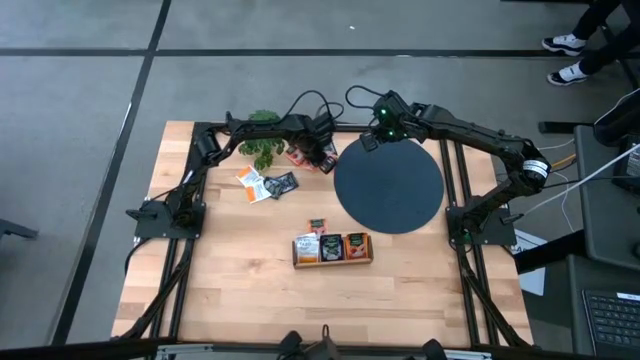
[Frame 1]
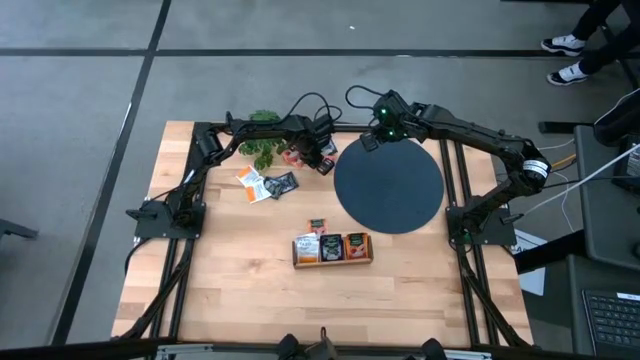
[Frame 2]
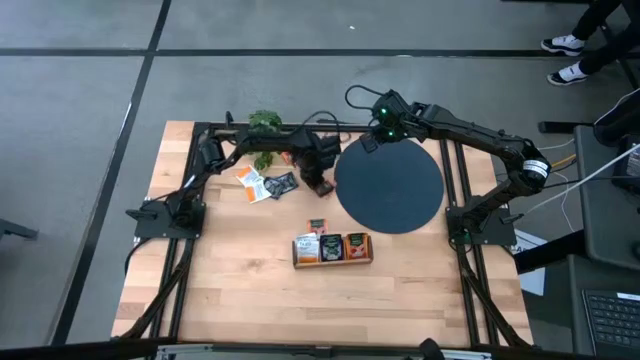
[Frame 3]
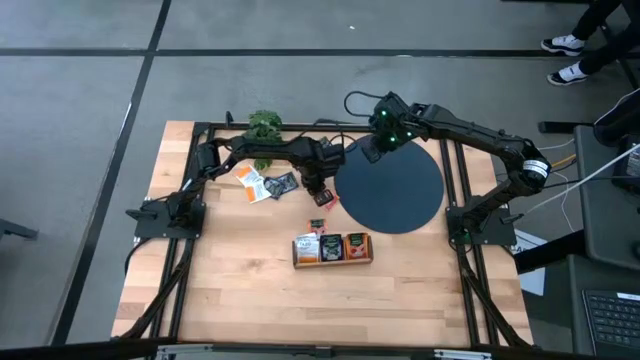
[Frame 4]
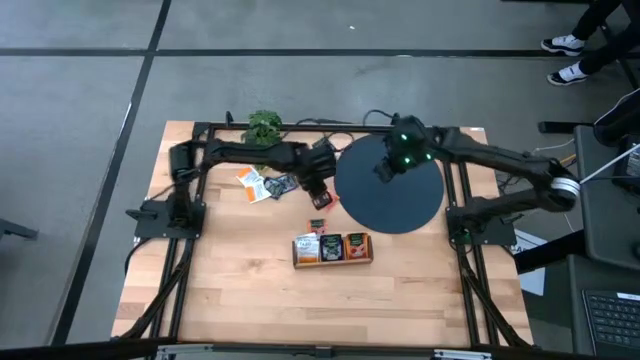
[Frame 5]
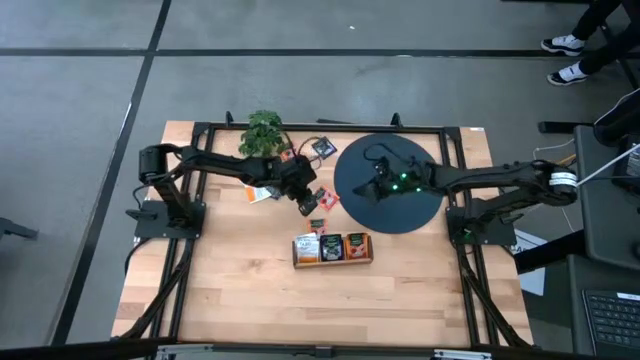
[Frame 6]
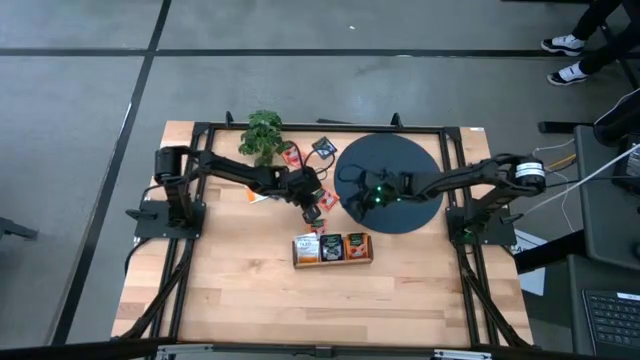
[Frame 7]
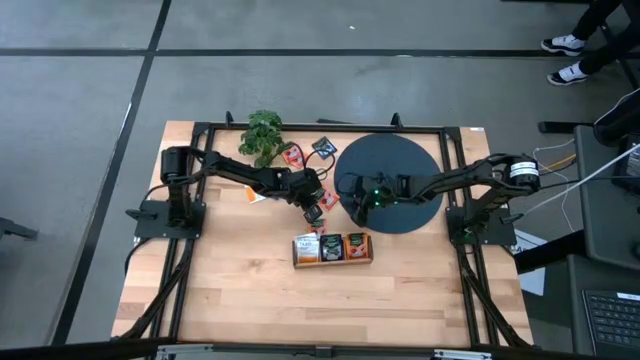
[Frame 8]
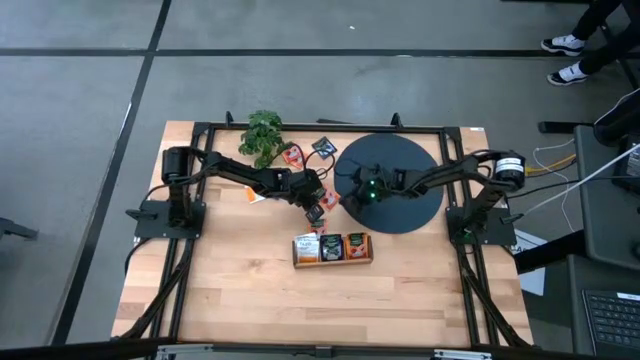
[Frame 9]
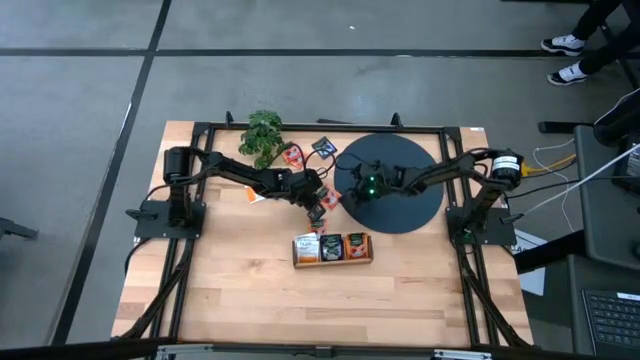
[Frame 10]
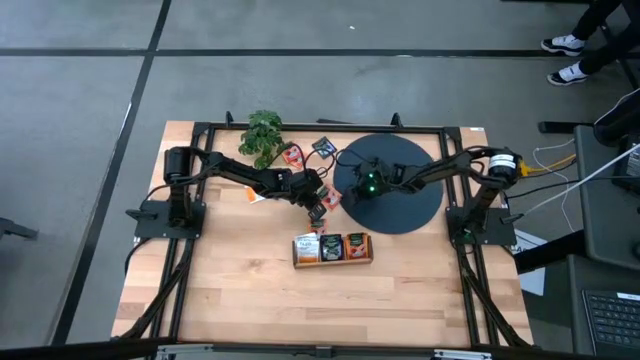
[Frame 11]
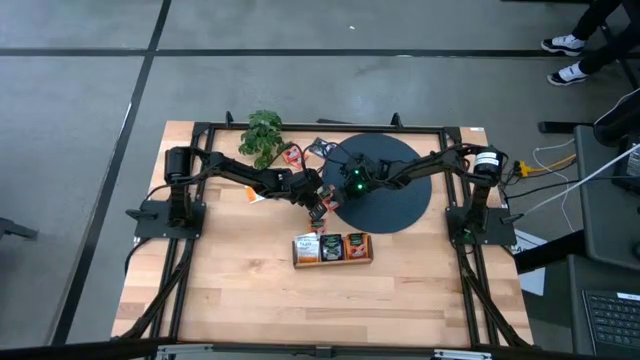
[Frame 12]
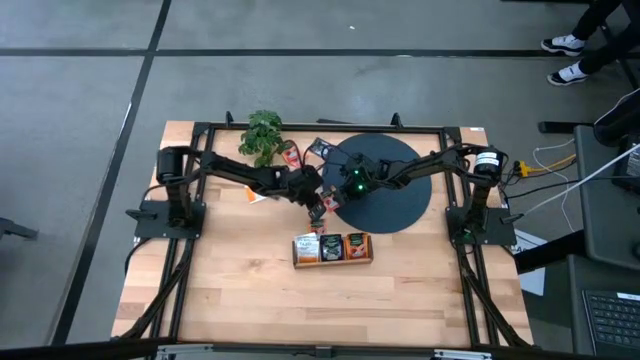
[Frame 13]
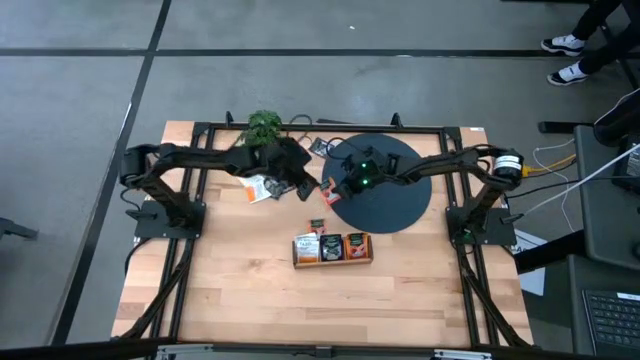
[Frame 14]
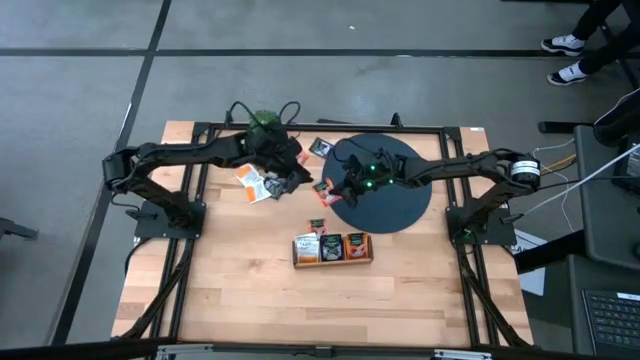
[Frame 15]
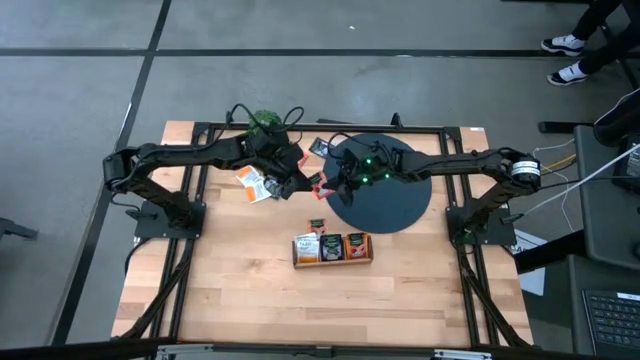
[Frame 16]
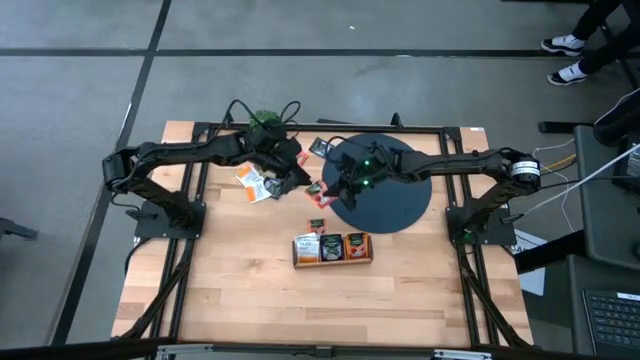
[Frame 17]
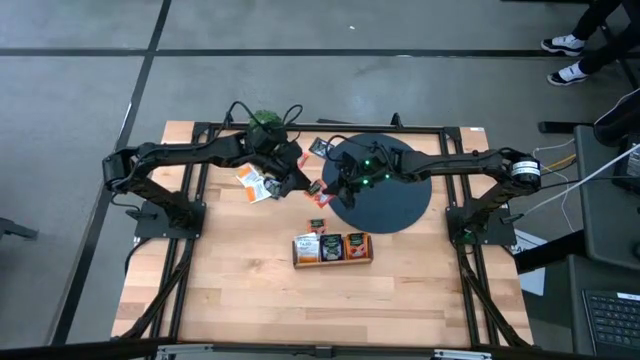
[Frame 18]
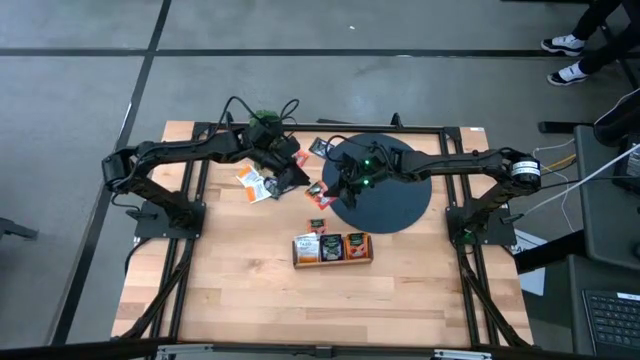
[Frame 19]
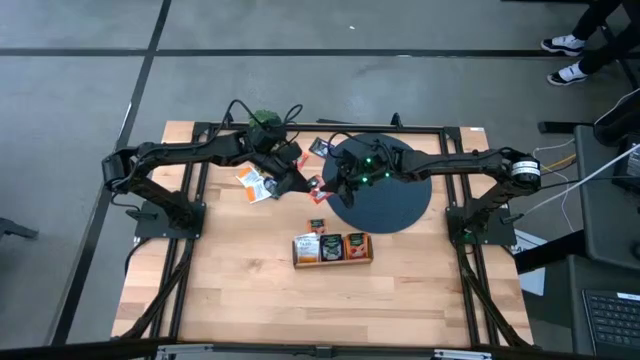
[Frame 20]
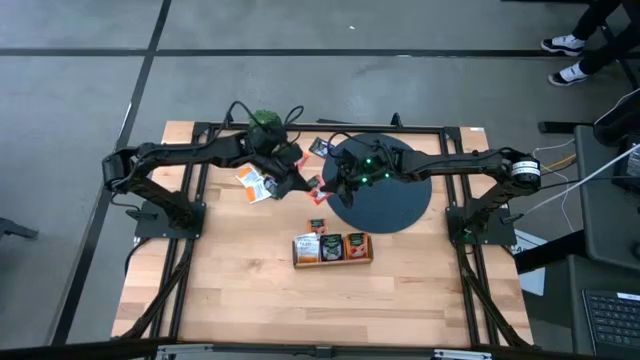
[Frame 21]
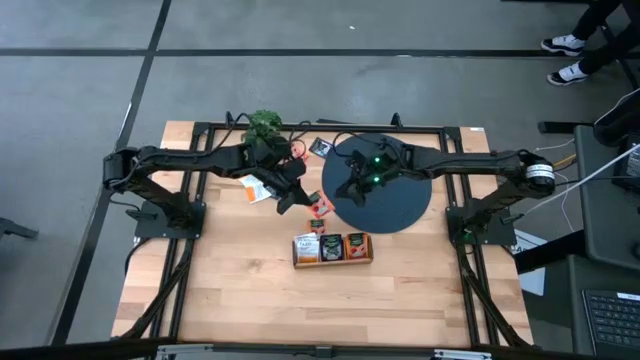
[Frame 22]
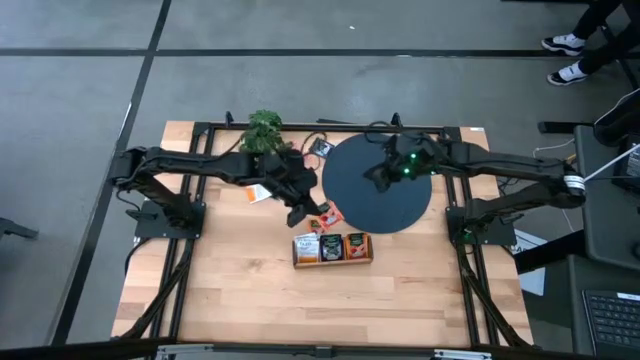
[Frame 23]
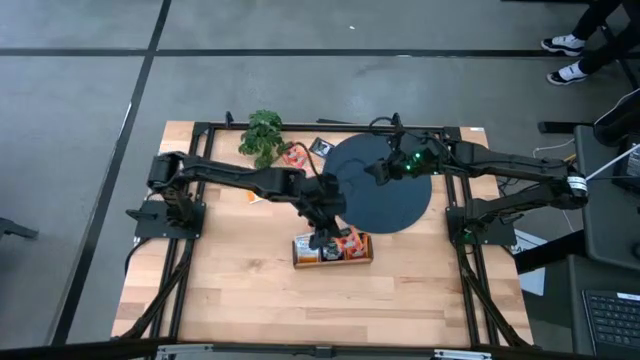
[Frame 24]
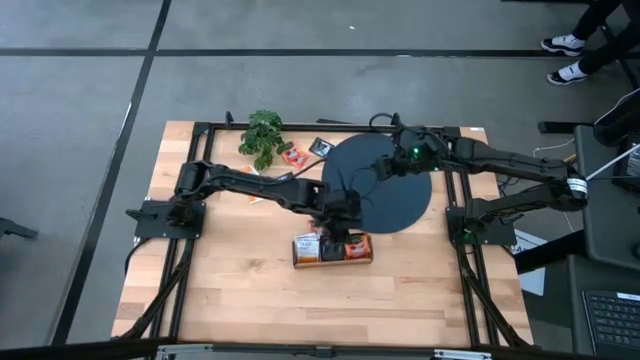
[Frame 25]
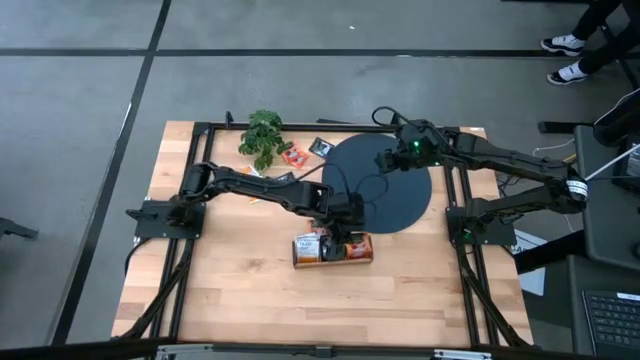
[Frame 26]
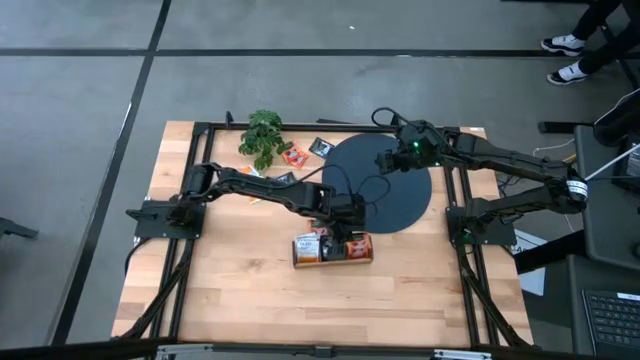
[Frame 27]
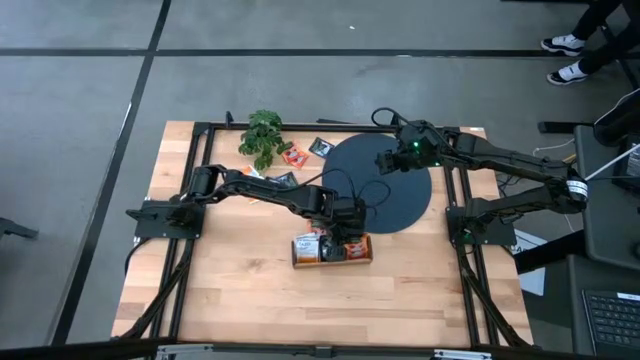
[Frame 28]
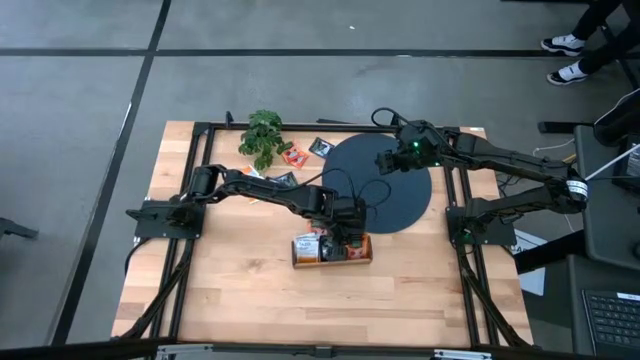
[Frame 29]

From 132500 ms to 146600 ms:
Task: Pick & Place Tea
Put the orange tea bag into the right section of the wooden organizer

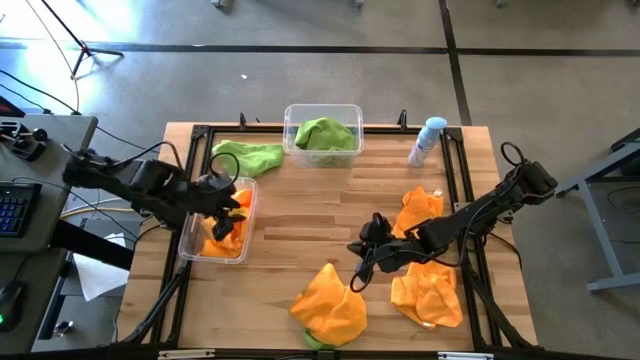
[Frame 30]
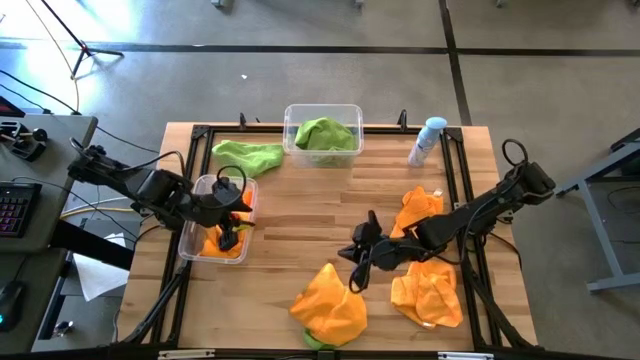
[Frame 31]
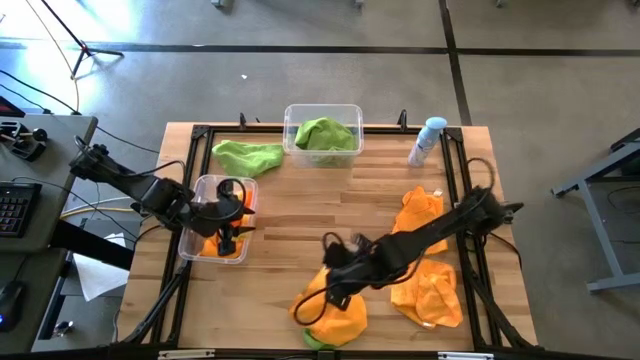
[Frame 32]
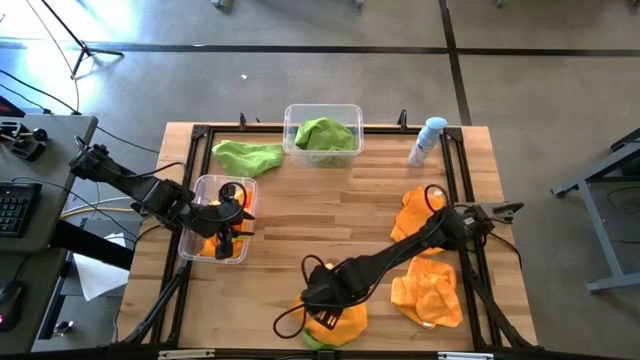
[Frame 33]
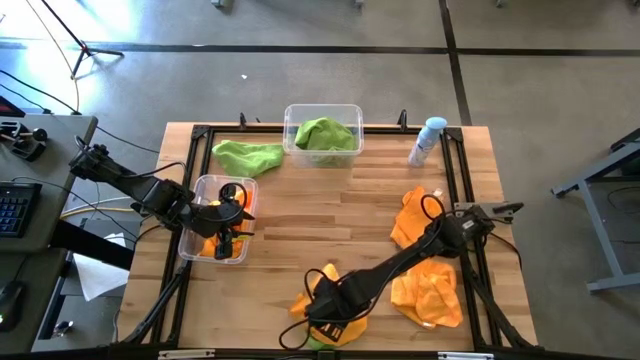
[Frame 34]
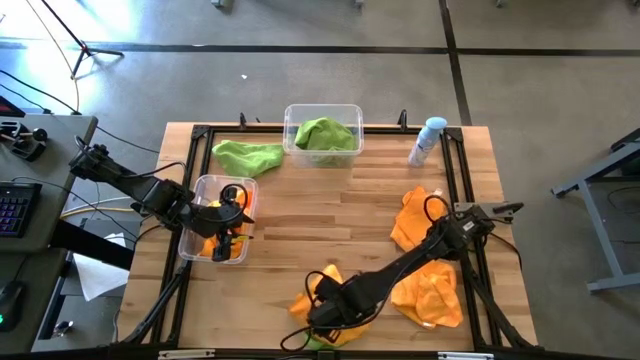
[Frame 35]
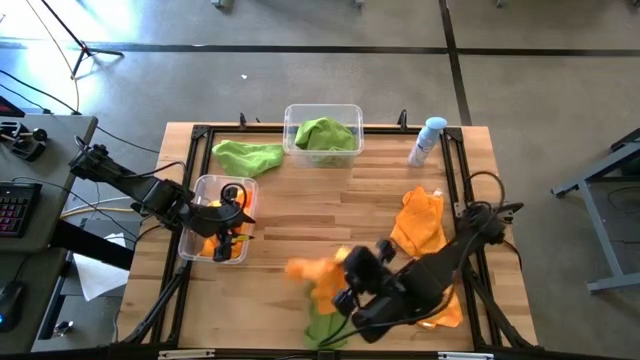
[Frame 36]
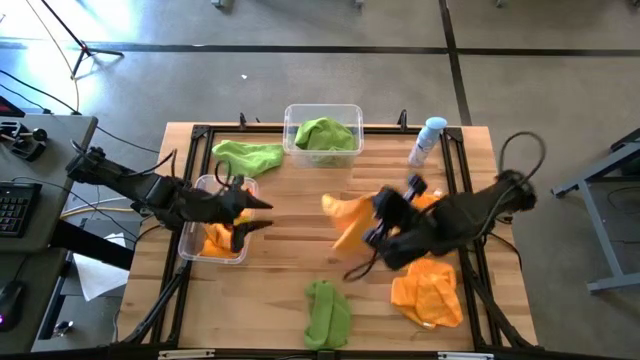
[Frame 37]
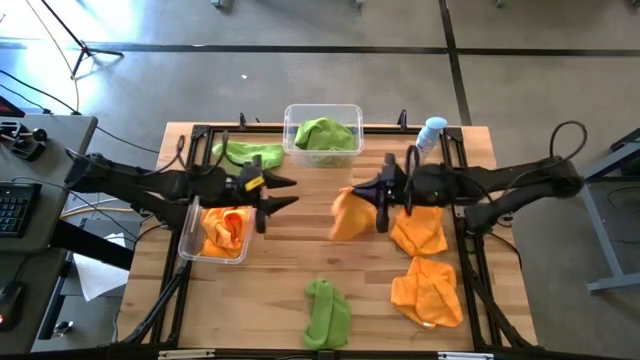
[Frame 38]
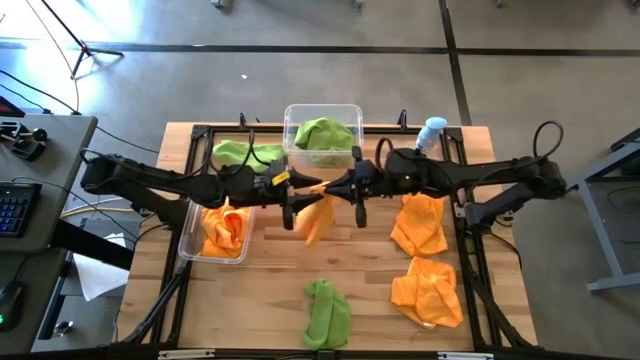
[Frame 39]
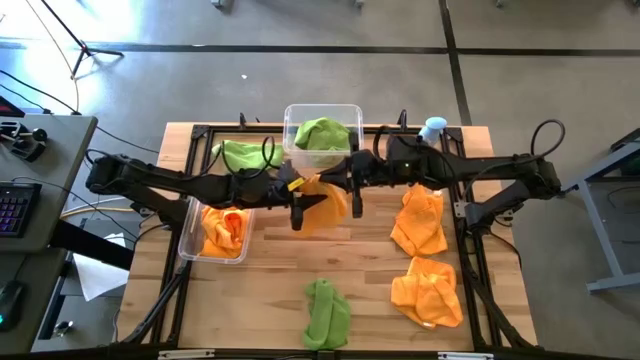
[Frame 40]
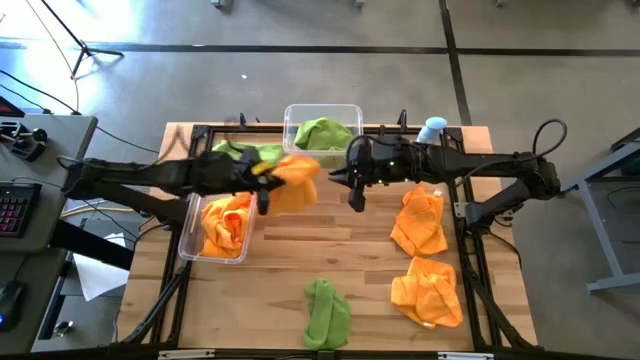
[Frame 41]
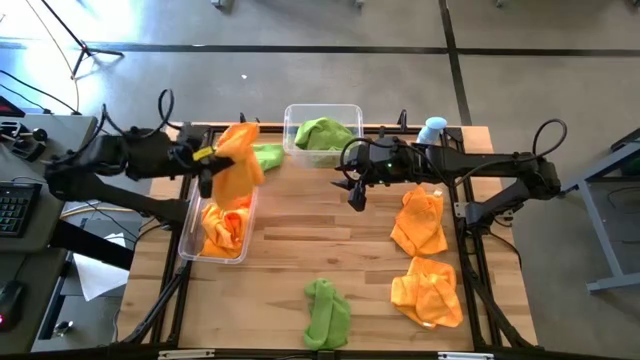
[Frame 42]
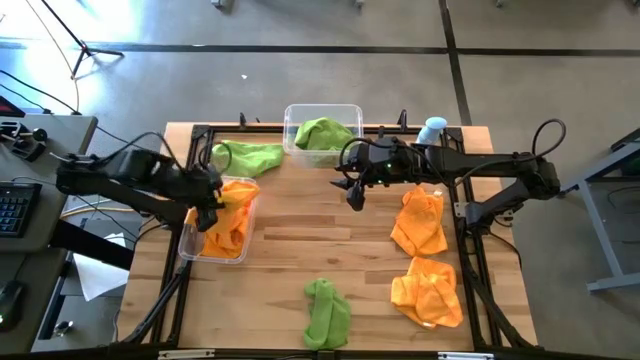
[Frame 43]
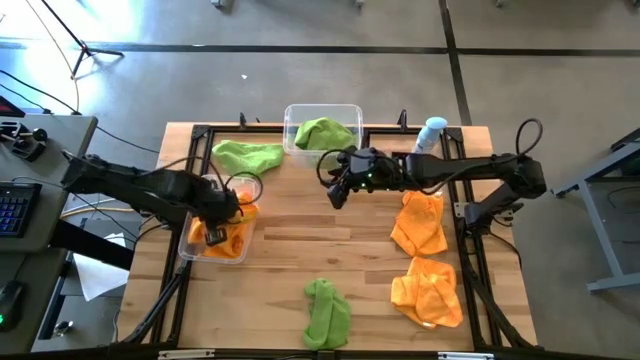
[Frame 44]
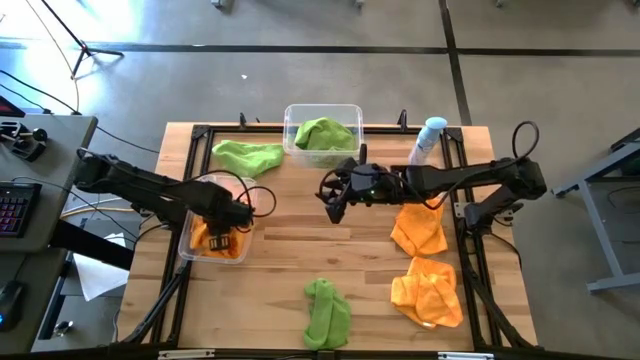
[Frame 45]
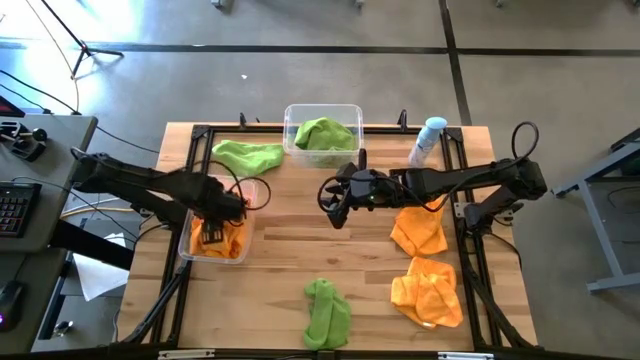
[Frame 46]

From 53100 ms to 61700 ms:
Task: Sort microfiber towel by color & place in baskets
Put the orange microfiber towel into the bottom transparent bin

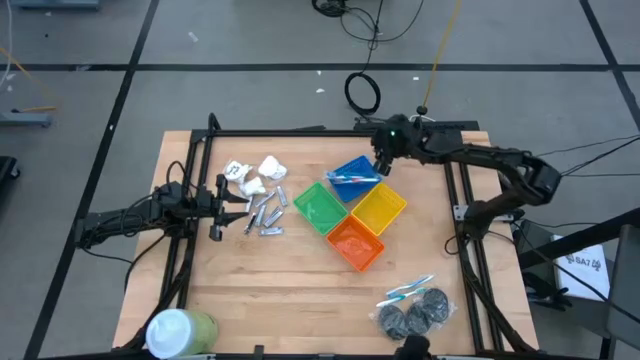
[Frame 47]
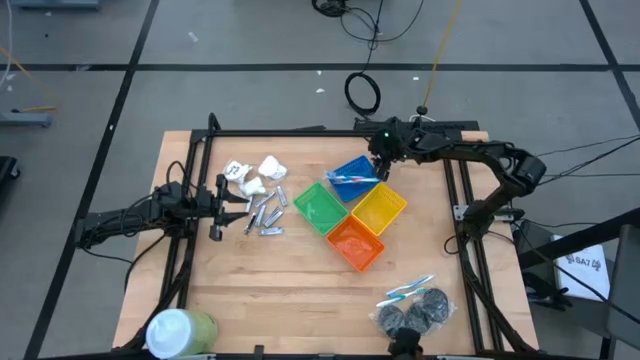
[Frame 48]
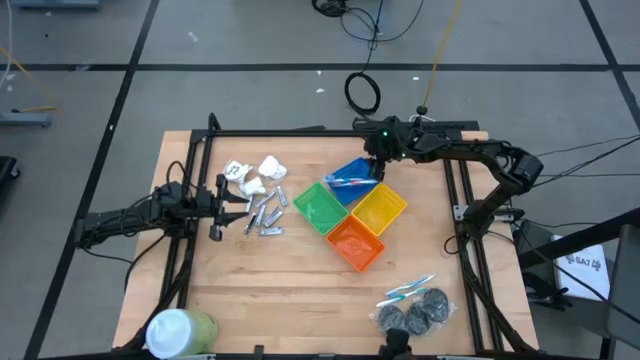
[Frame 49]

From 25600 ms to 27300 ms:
Task: Pick & Place Travel size toiletries
Adjust the blue bin
